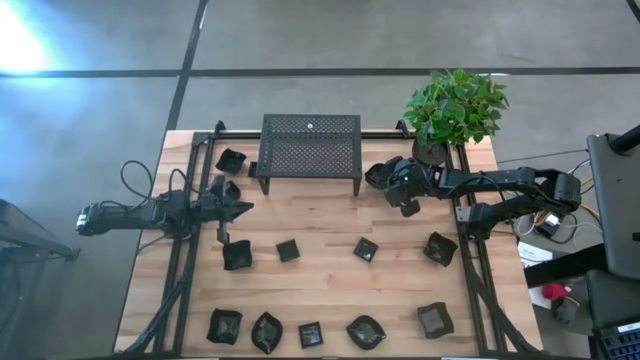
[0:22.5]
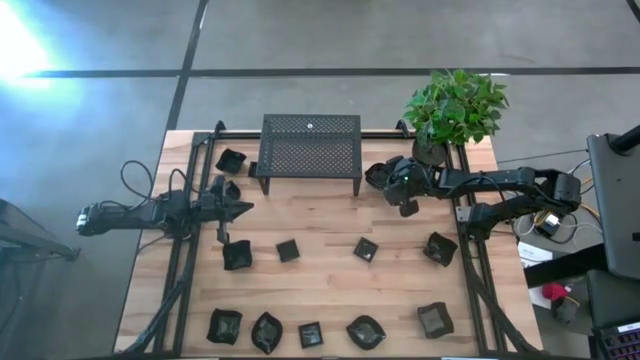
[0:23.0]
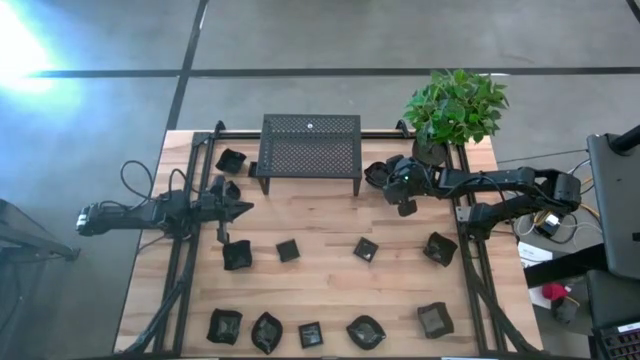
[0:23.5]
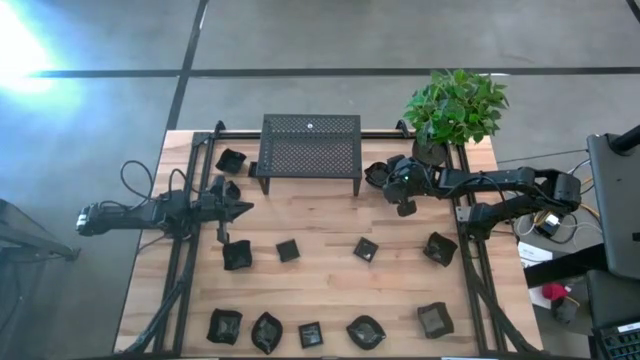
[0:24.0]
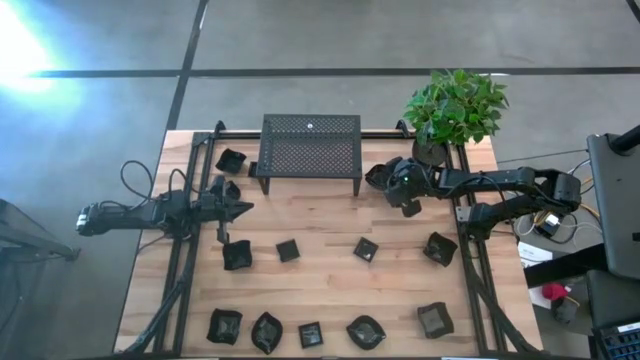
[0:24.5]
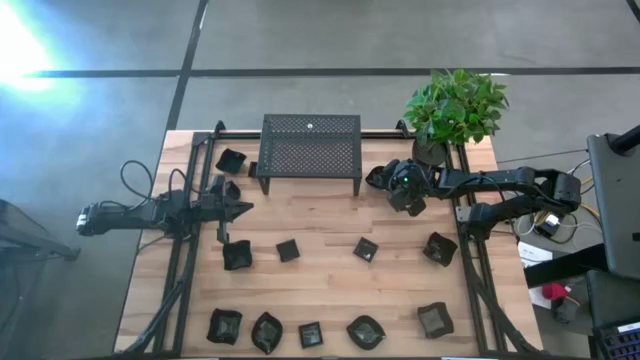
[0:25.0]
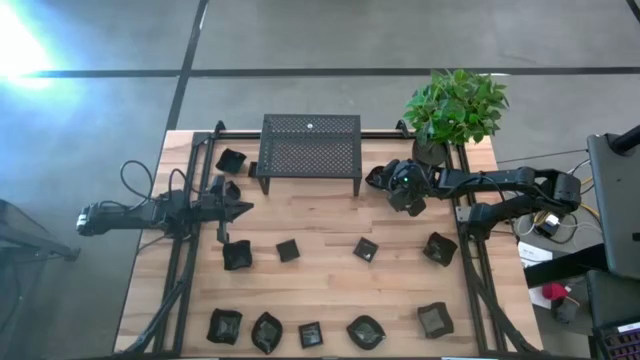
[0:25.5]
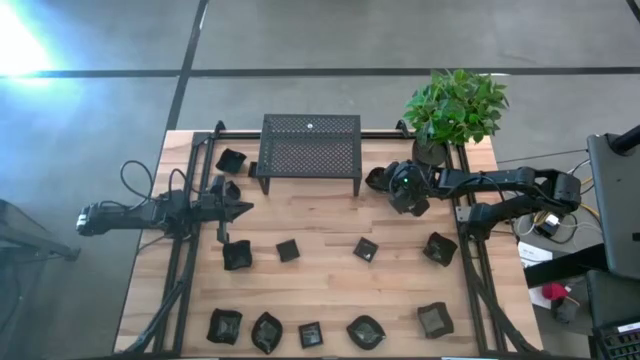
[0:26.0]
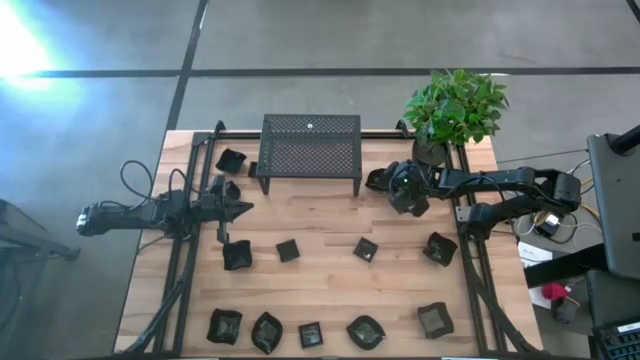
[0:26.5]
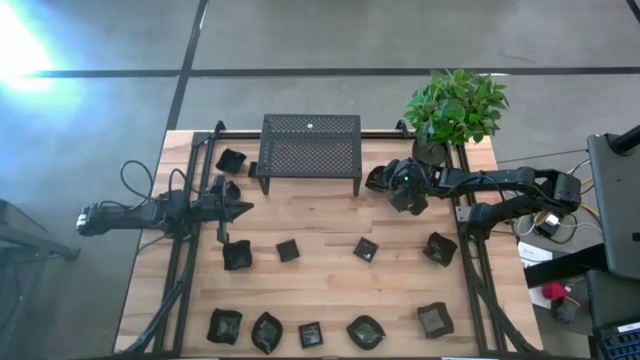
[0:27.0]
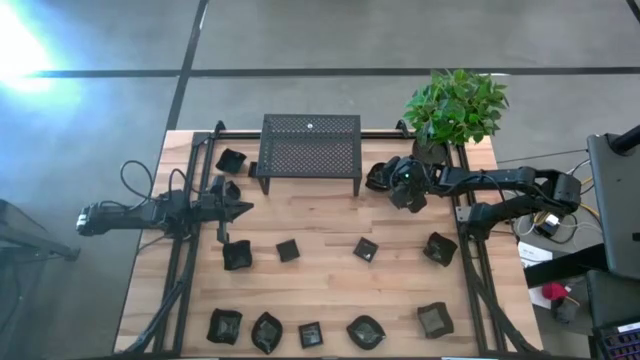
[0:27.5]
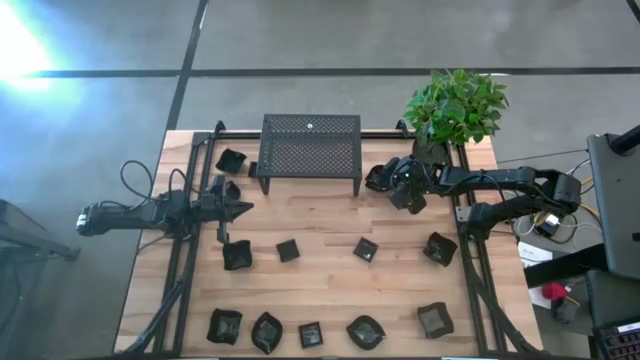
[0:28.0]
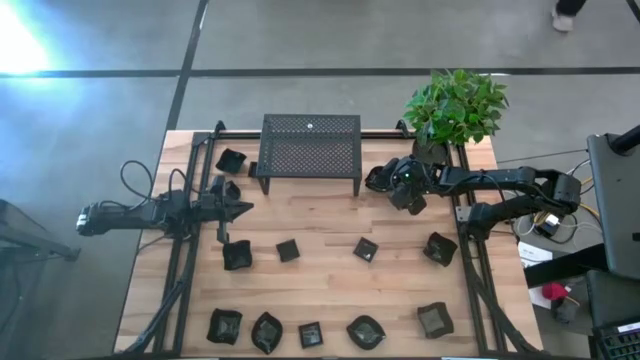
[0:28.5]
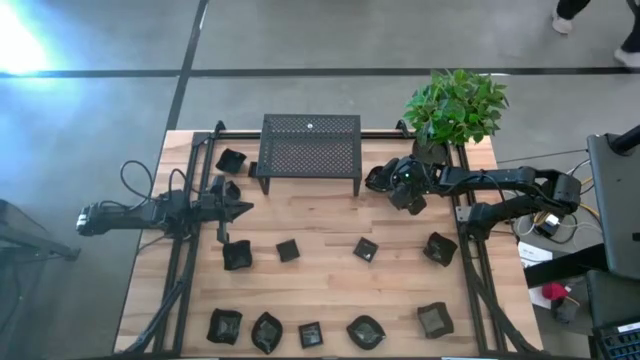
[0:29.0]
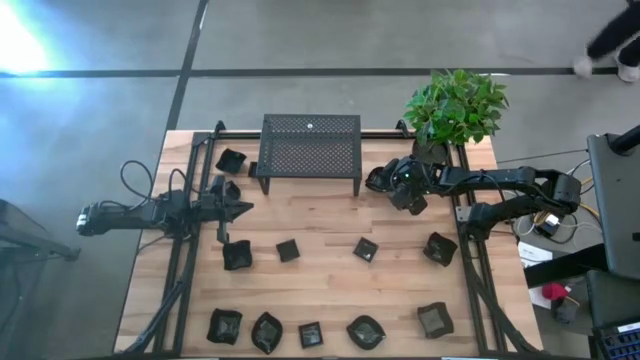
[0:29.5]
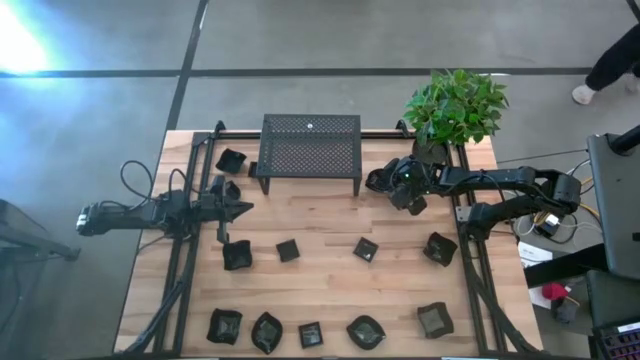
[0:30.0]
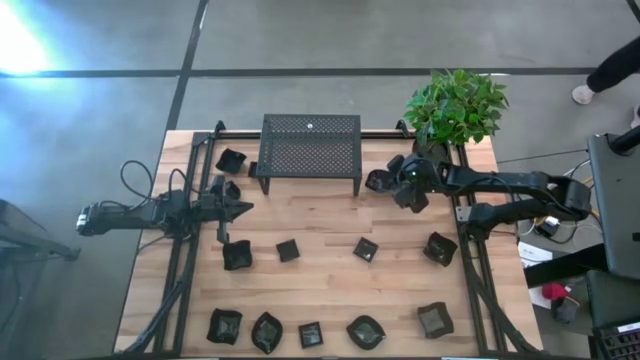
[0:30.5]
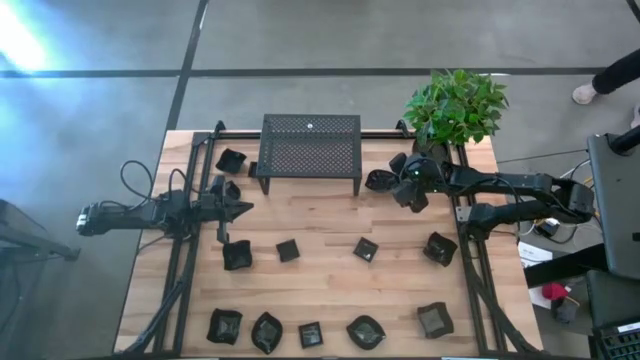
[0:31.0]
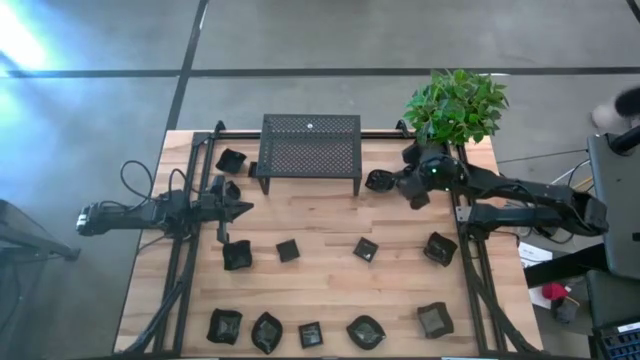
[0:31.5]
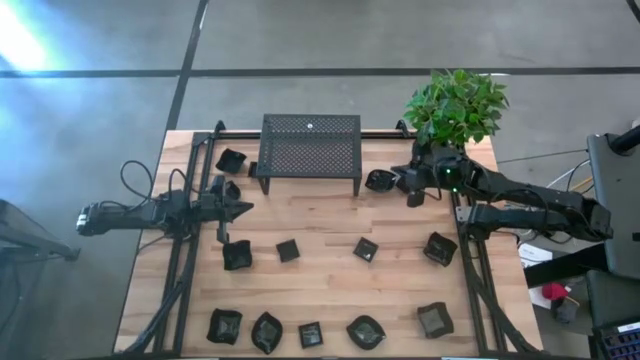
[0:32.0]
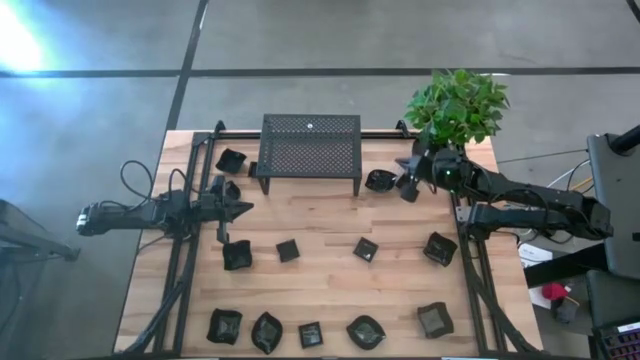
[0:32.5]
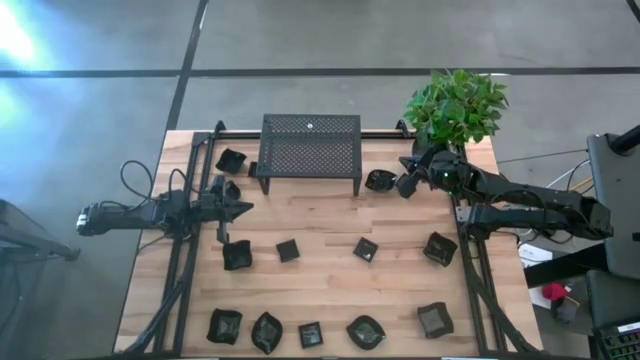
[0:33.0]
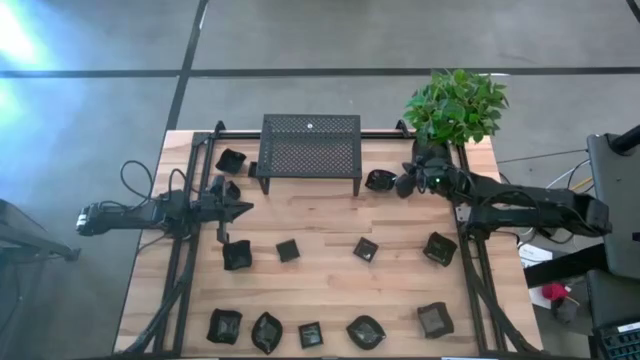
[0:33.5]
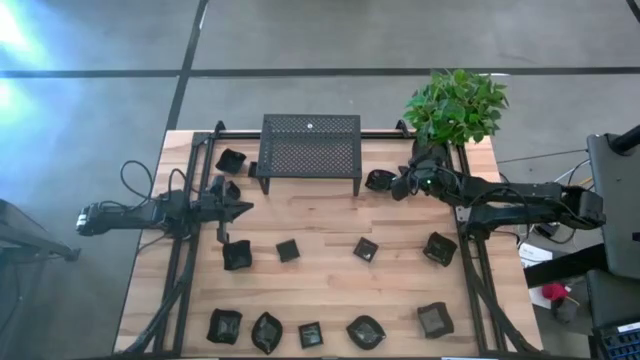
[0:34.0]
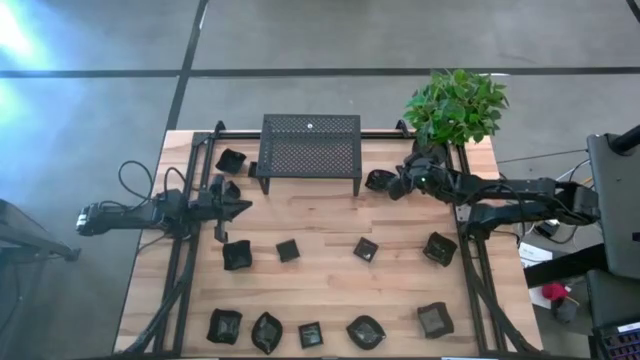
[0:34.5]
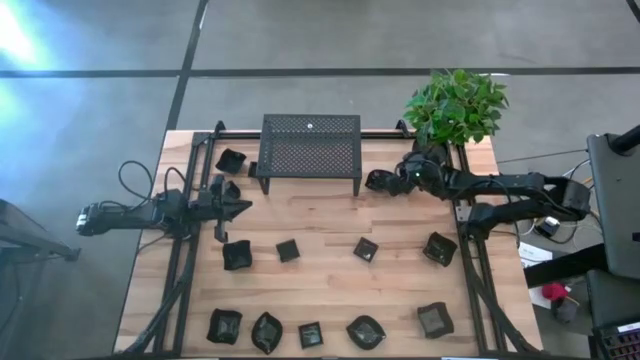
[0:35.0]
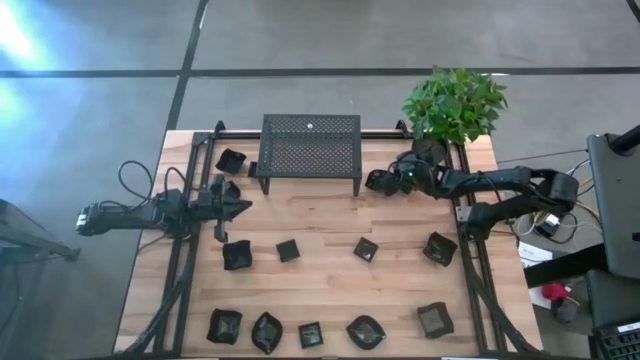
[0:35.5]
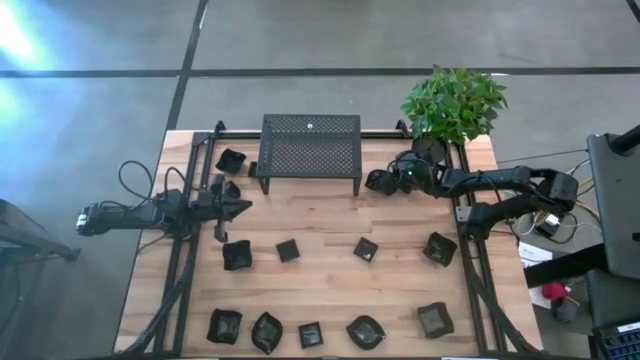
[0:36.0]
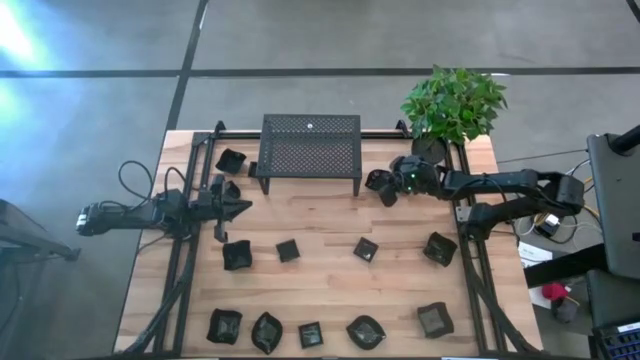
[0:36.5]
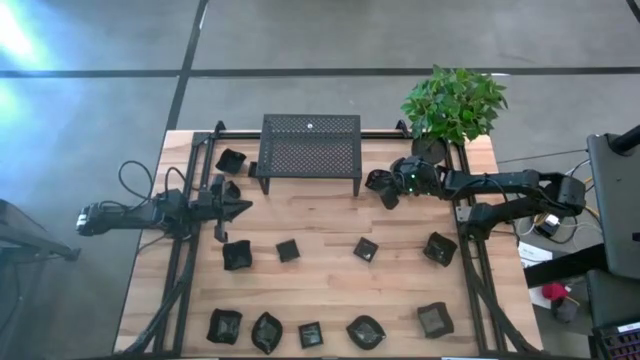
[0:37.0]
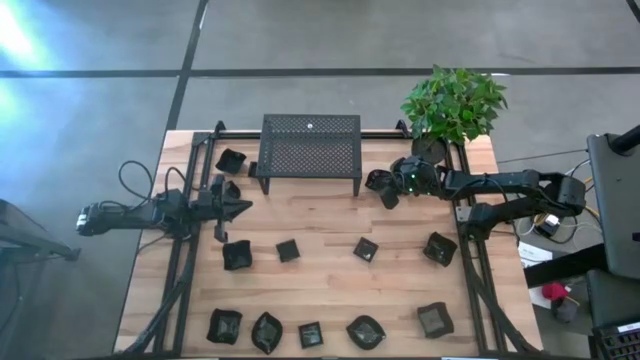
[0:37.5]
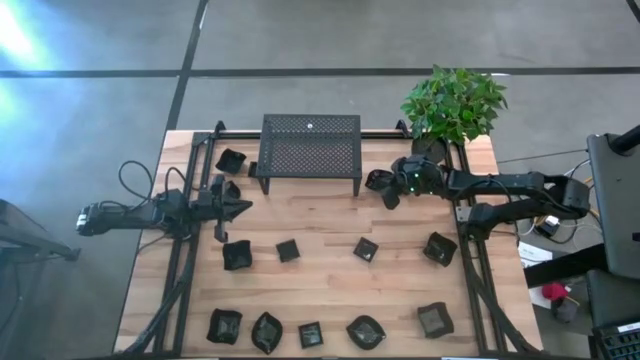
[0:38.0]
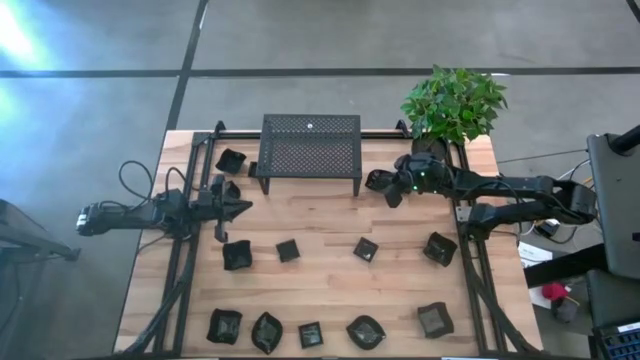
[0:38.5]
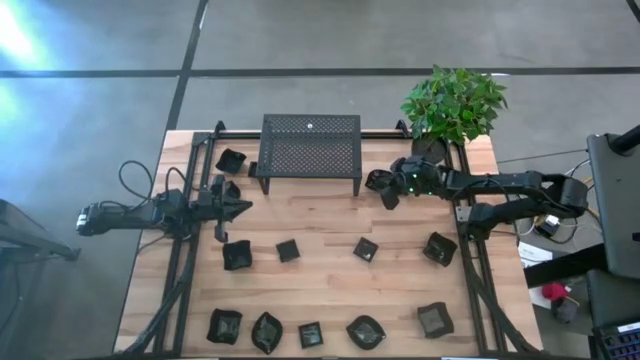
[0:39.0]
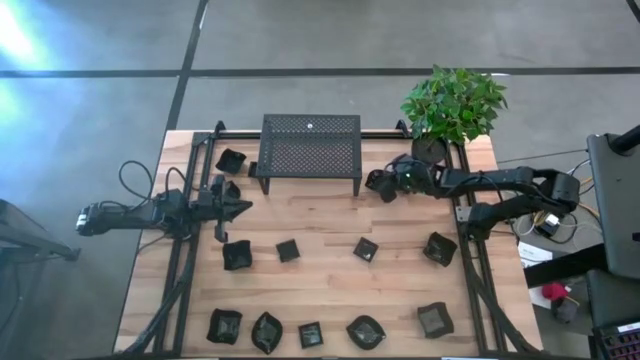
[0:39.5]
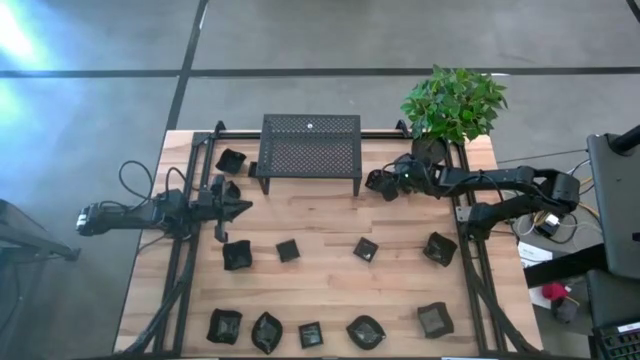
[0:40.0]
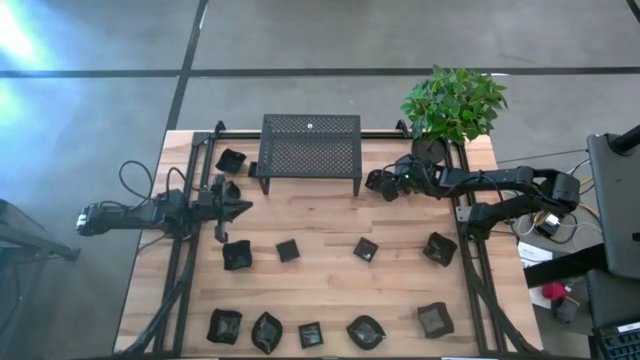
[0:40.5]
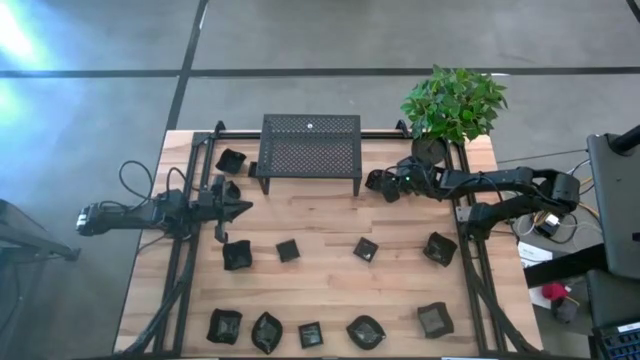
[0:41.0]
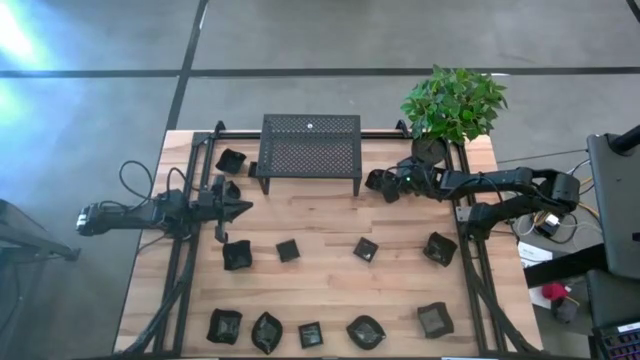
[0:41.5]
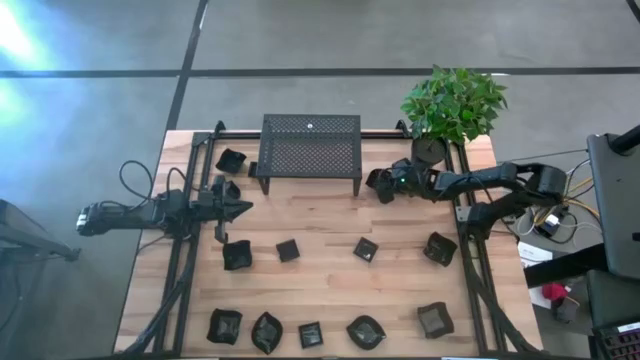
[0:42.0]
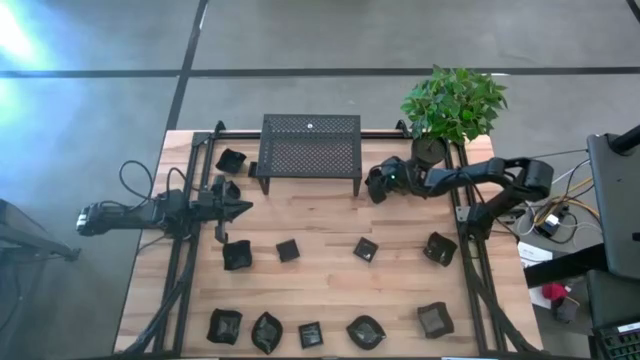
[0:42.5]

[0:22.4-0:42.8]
Task: Pick & Place Mini shaped plates
Stack the black leaf shaped plate on top of the other black leaf shaped plate

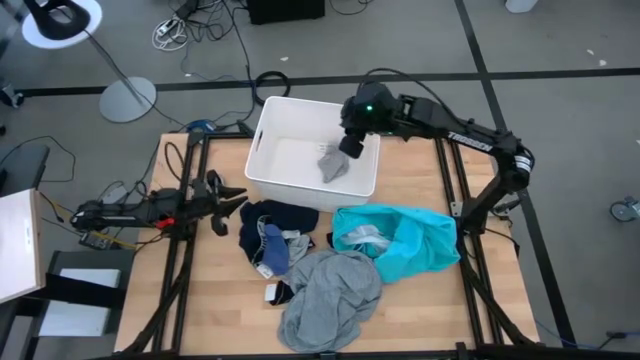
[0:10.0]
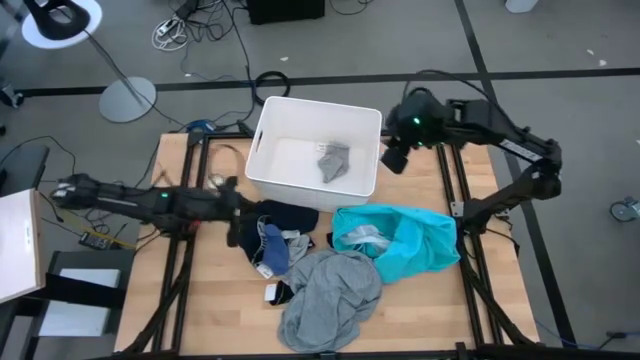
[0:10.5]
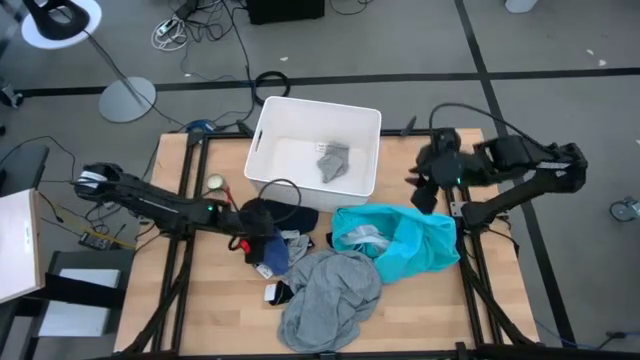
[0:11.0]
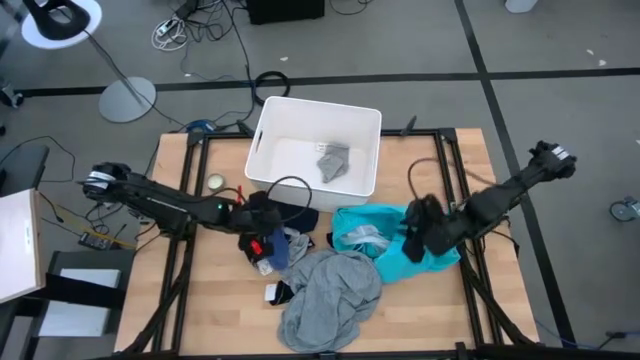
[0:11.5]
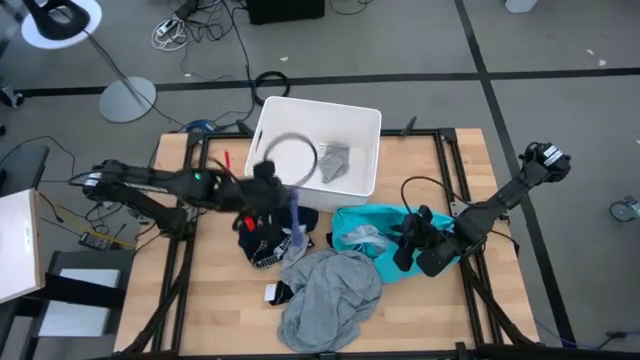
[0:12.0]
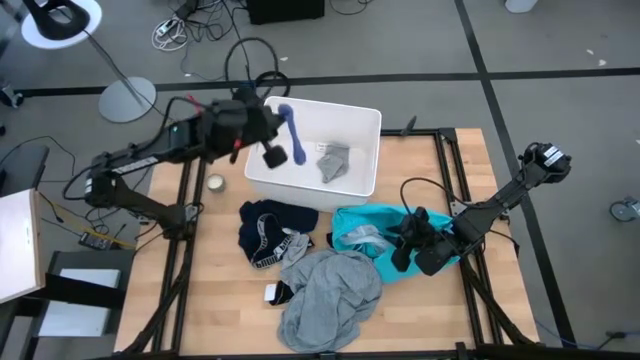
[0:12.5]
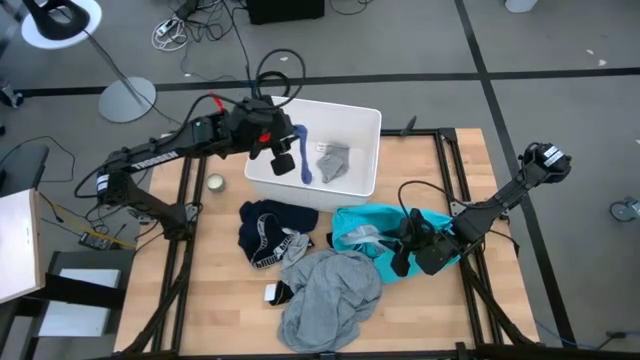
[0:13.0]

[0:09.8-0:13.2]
Task: Sort clothes
Put the blue sock into the bin
